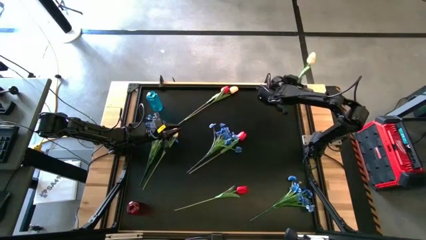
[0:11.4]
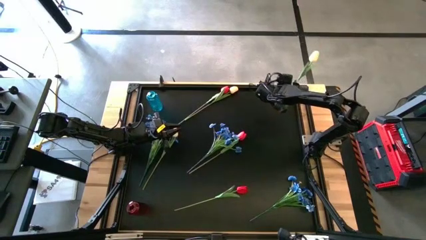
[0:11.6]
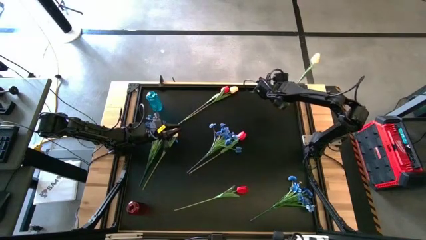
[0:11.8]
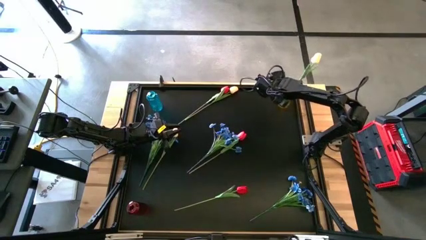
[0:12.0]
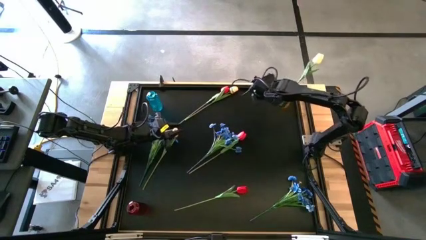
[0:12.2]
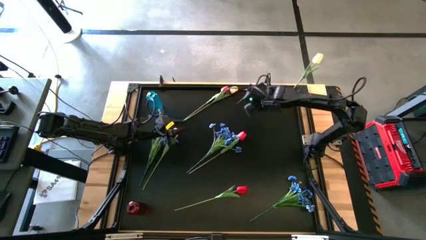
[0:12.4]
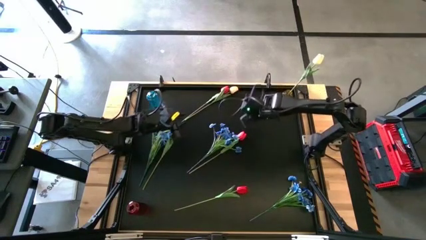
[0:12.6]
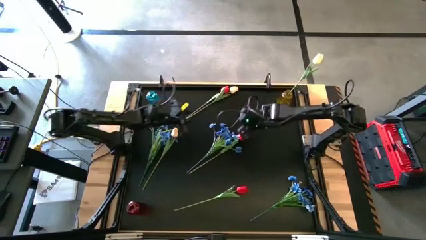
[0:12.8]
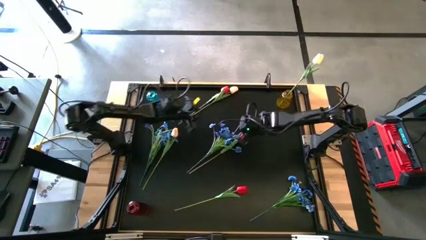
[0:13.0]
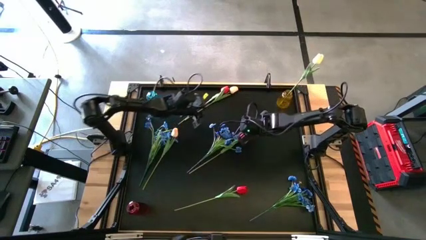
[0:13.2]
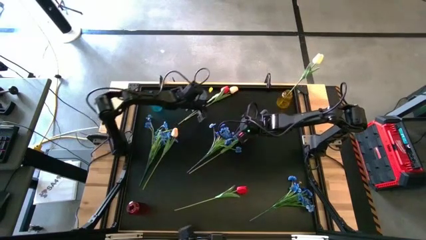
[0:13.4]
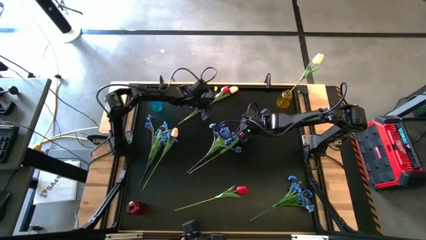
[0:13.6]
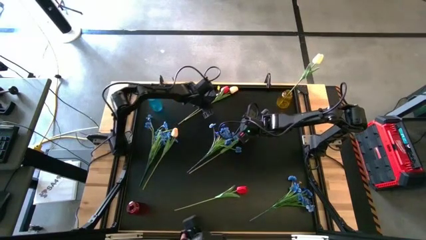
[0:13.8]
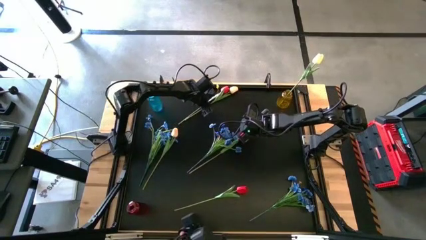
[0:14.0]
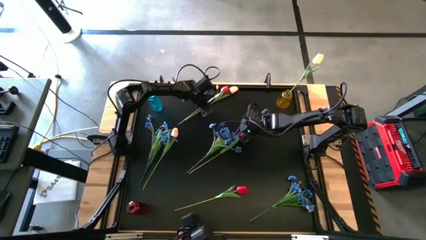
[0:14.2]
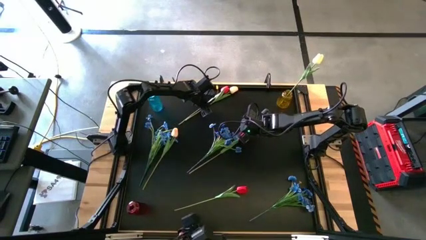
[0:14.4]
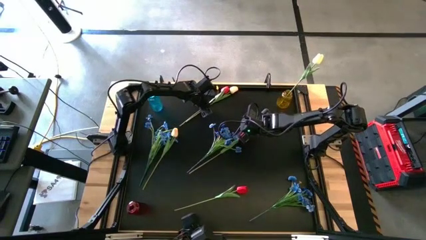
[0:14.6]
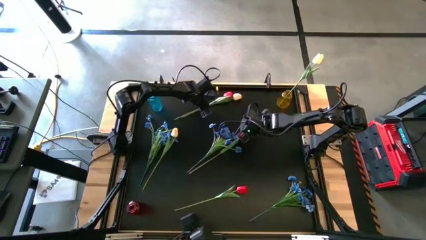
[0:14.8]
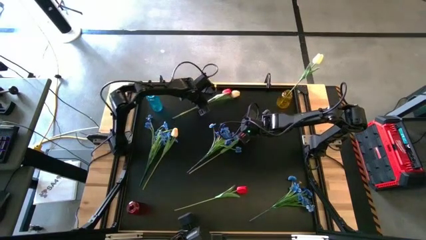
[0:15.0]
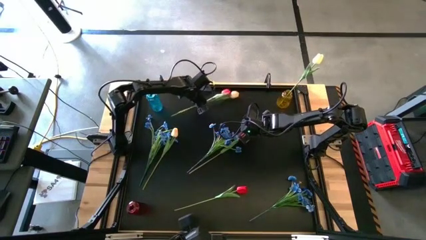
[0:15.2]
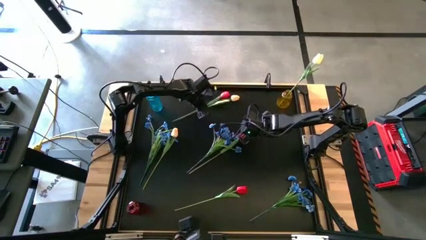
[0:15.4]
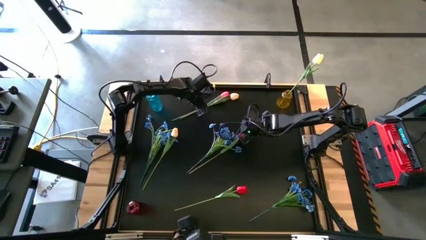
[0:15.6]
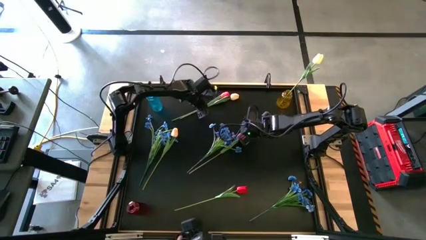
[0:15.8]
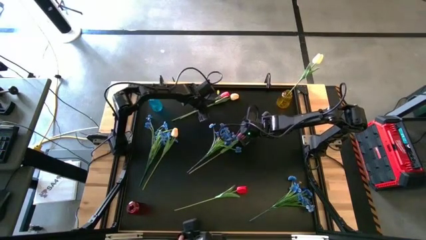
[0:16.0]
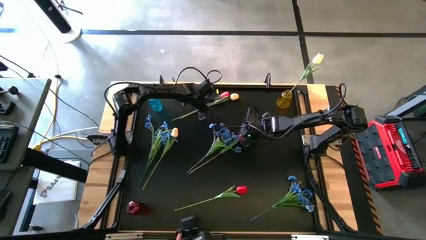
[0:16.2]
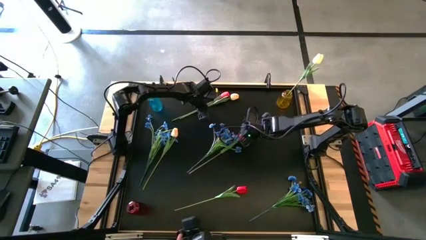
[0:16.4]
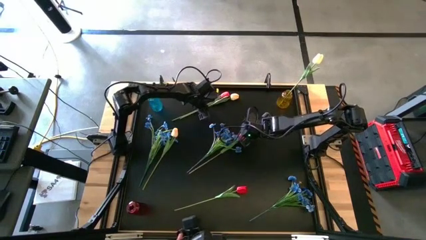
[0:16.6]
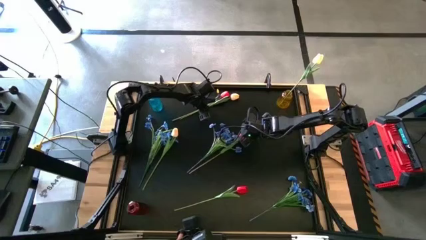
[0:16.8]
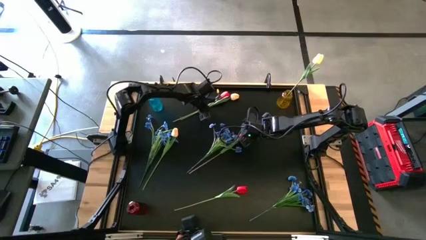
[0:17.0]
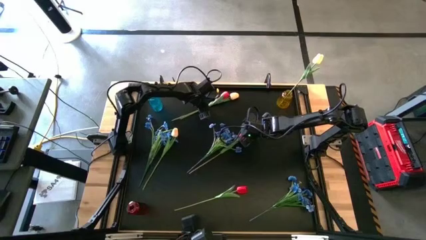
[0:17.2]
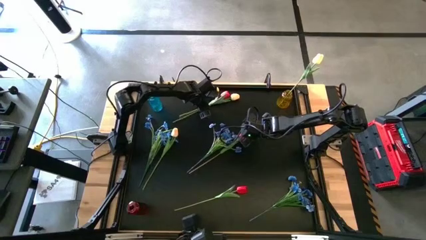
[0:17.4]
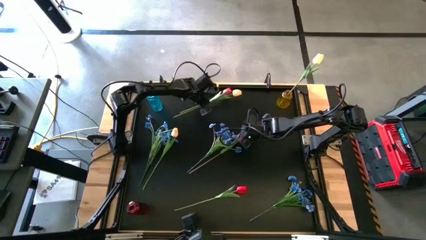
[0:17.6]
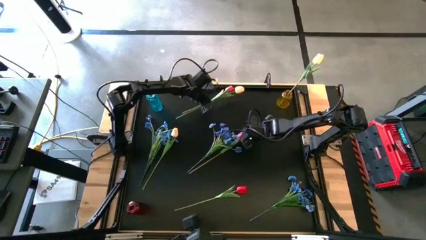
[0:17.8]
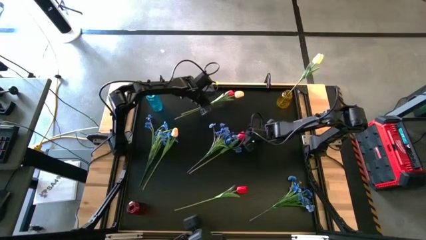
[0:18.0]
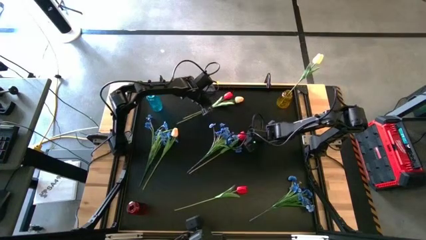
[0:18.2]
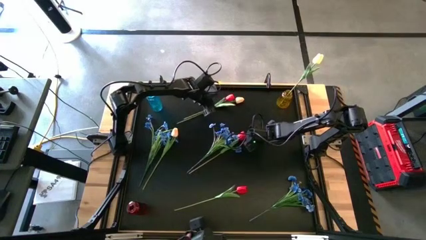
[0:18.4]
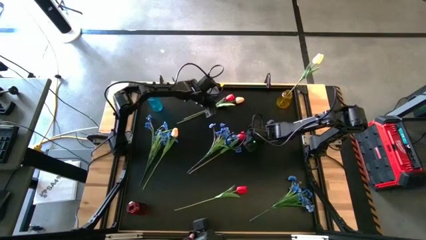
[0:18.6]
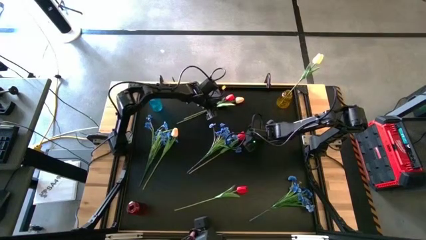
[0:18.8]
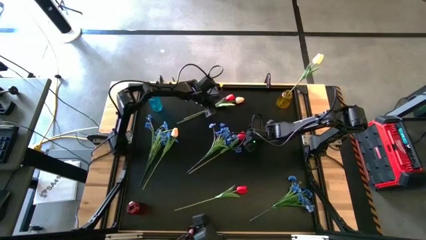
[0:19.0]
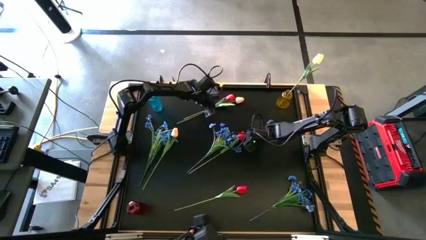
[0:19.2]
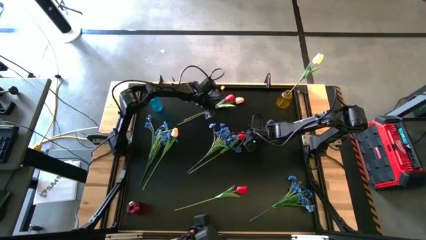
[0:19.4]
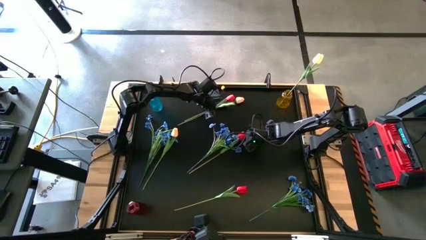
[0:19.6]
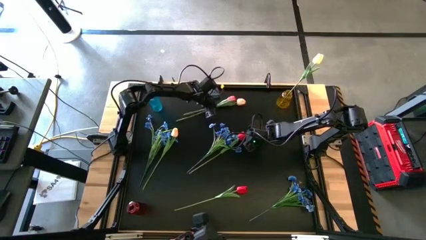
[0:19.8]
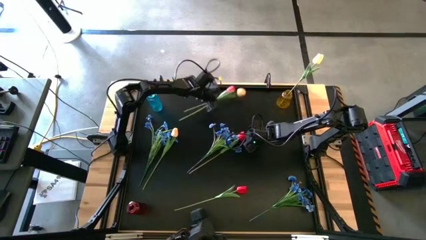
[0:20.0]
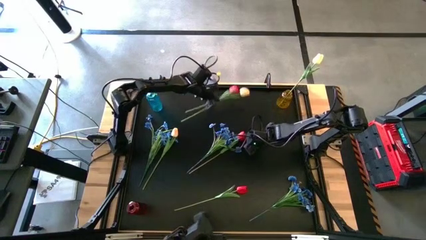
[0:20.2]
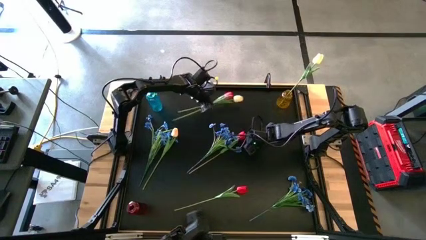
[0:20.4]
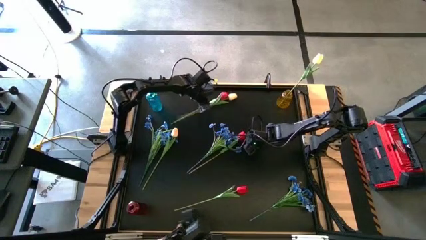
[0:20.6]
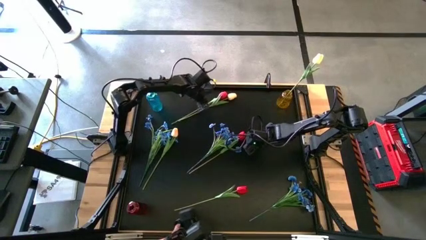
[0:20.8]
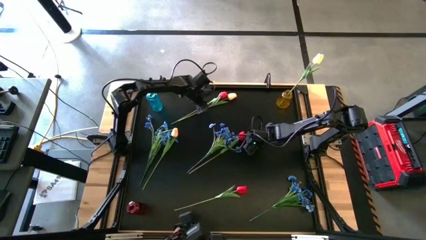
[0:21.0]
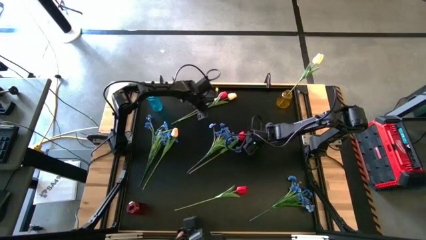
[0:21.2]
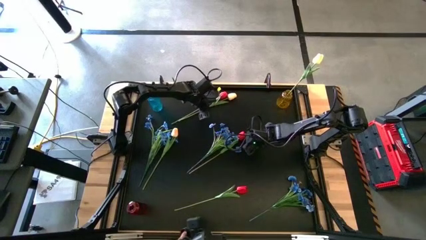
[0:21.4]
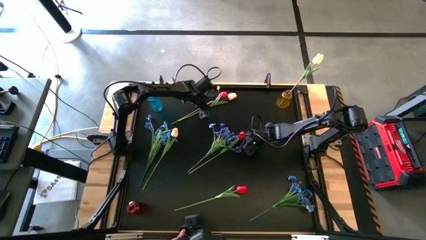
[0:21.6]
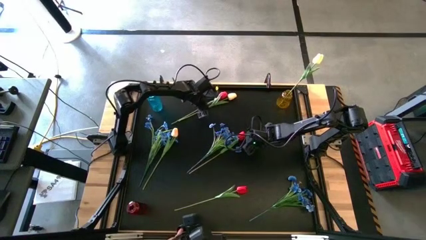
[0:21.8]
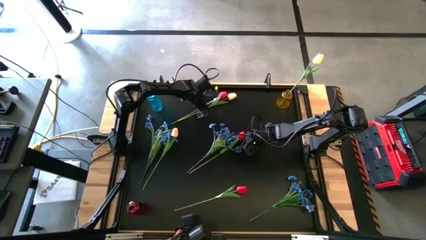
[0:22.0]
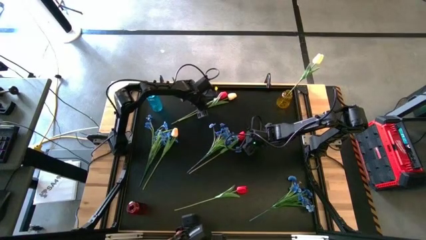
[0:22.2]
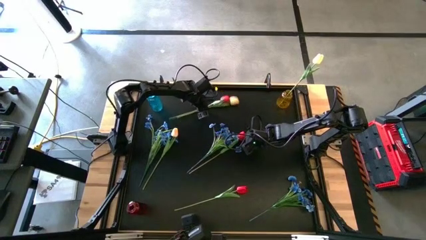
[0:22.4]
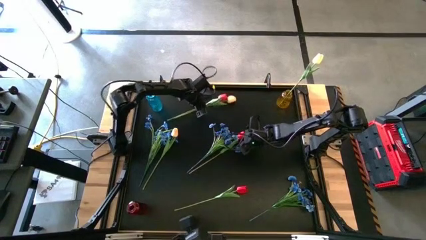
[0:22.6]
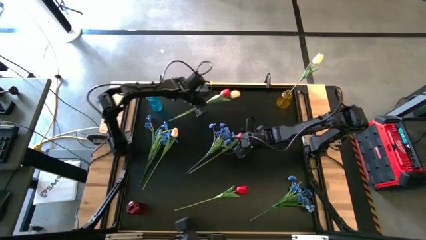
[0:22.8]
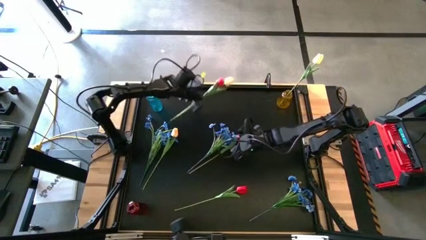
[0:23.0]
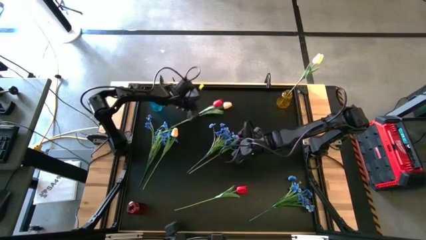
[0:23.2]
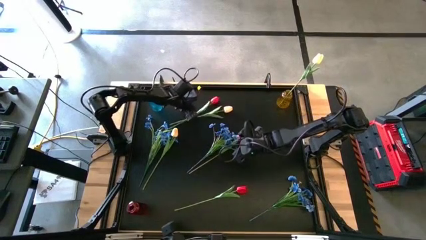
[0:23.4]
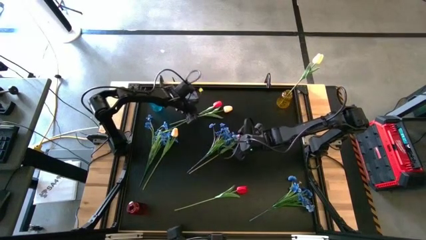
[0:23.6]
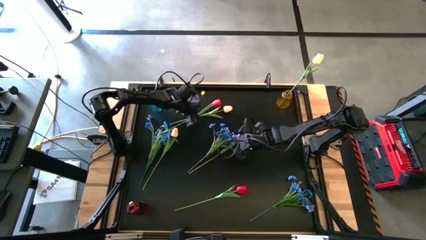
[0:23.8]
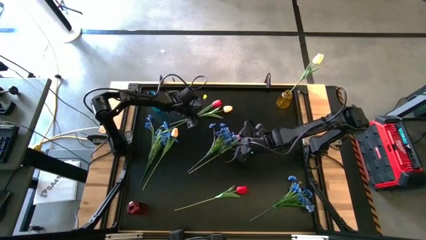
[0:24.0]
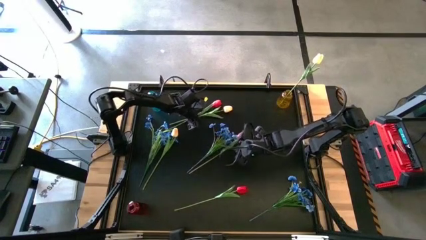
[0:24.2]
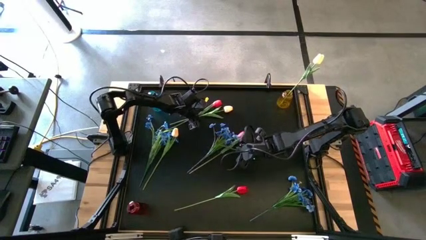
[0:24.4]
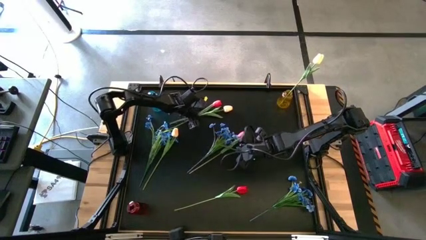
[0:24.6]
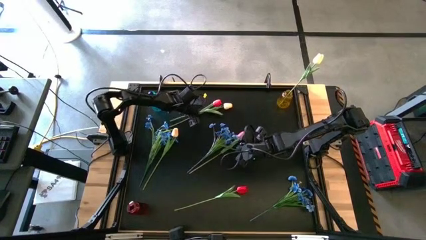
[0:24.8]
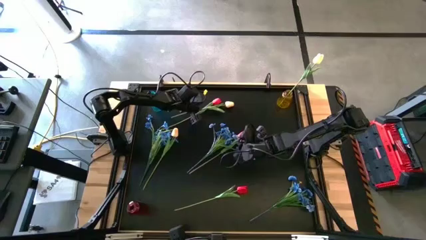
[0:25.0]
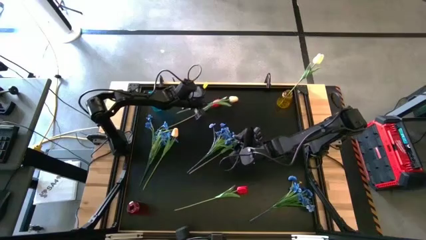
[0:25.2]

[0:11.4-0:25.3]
Task: Sort flowers into vase by color
Put the top yellow flower into the yellow vase
